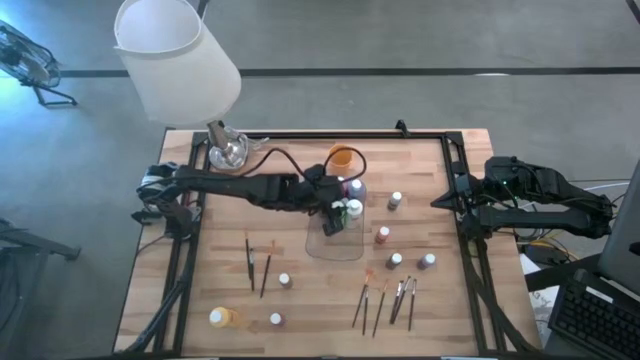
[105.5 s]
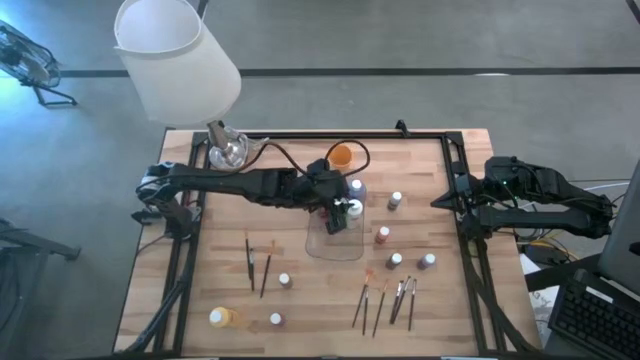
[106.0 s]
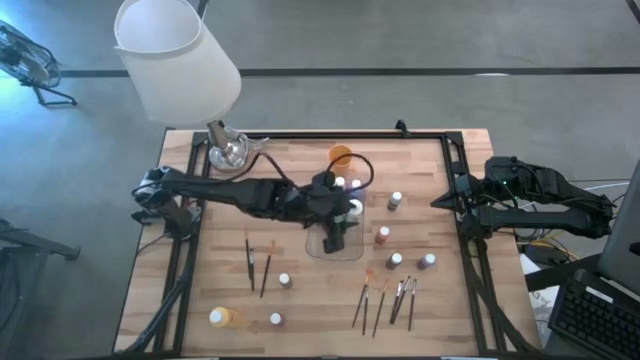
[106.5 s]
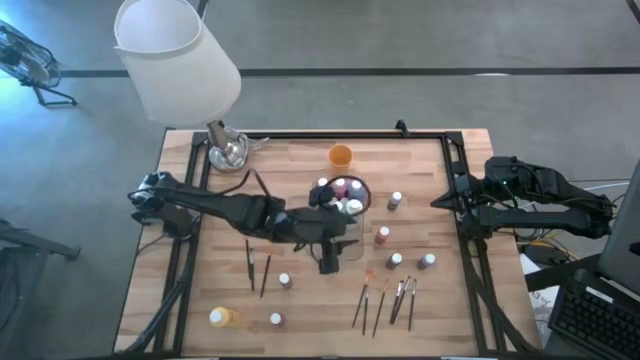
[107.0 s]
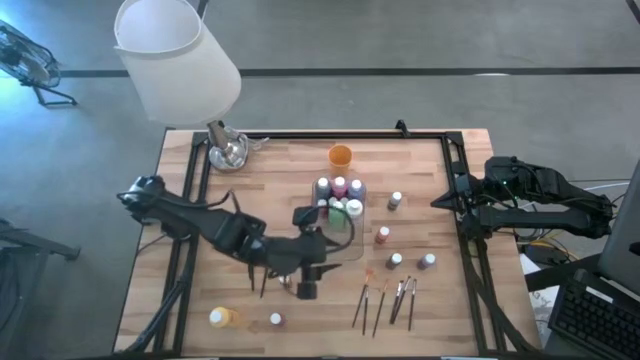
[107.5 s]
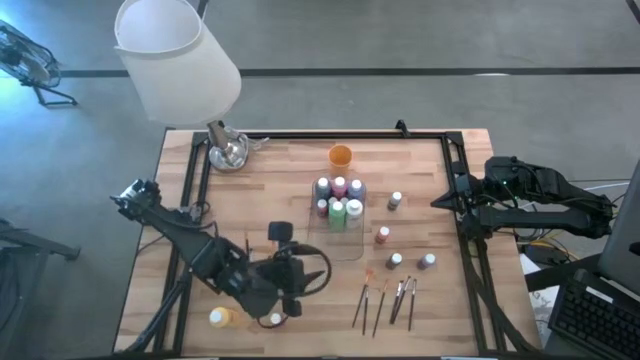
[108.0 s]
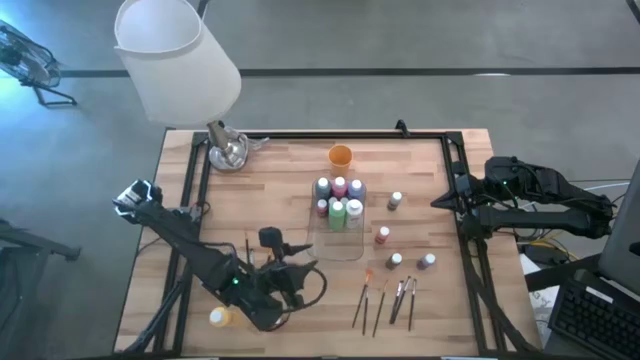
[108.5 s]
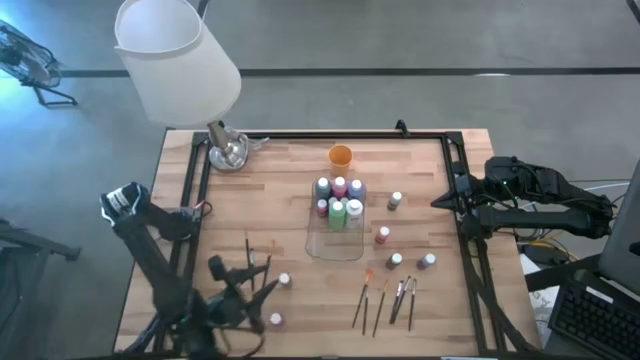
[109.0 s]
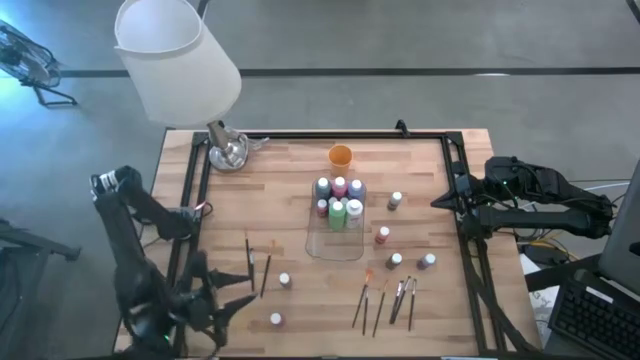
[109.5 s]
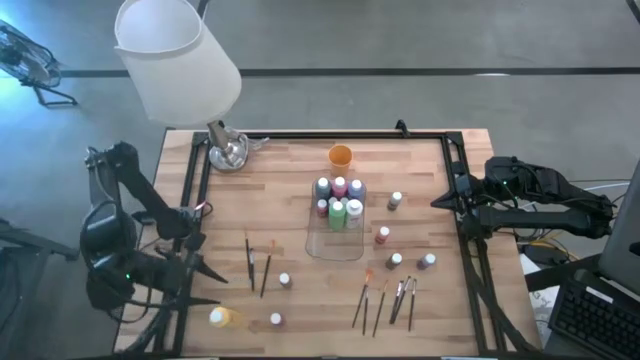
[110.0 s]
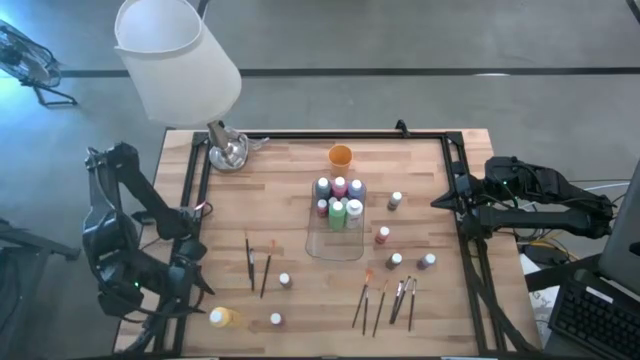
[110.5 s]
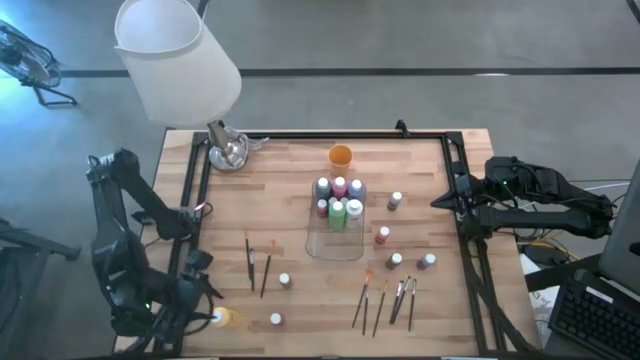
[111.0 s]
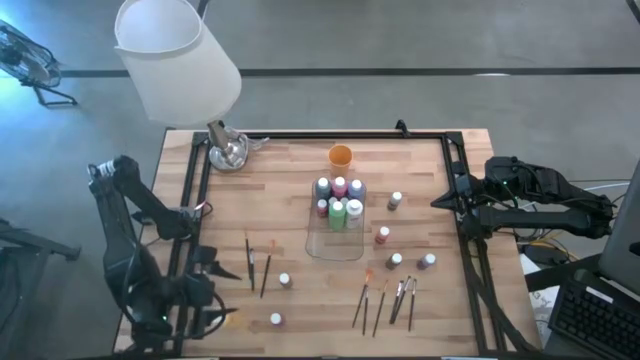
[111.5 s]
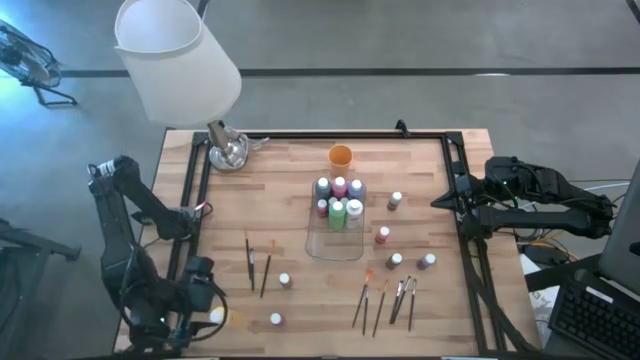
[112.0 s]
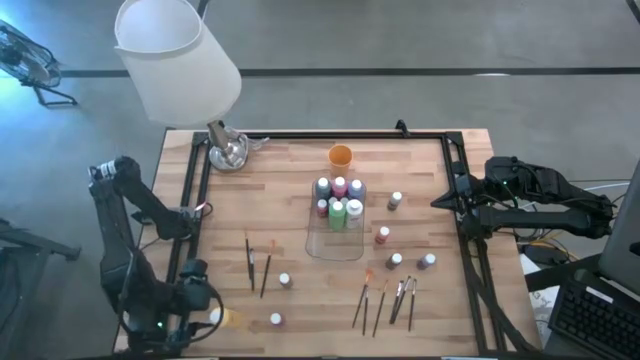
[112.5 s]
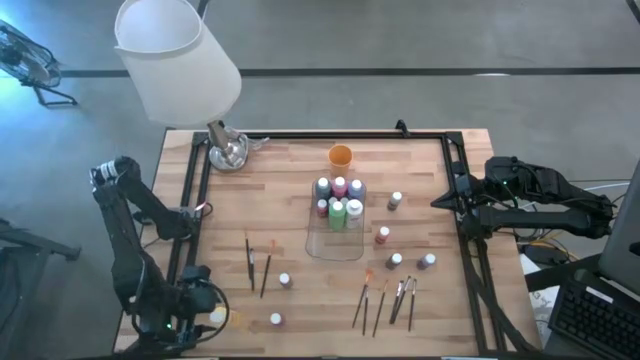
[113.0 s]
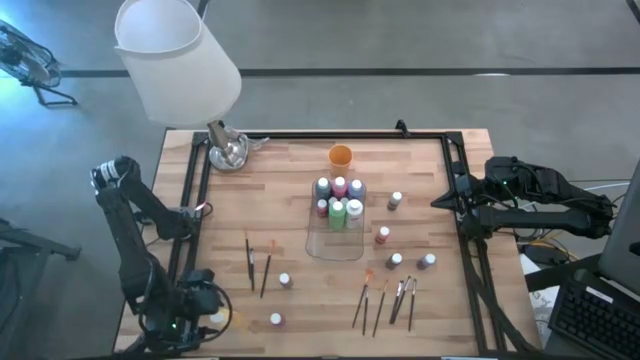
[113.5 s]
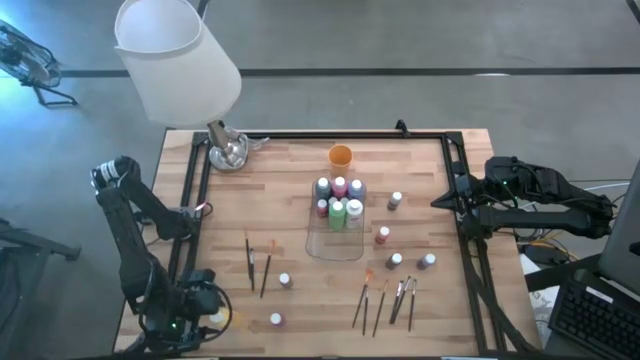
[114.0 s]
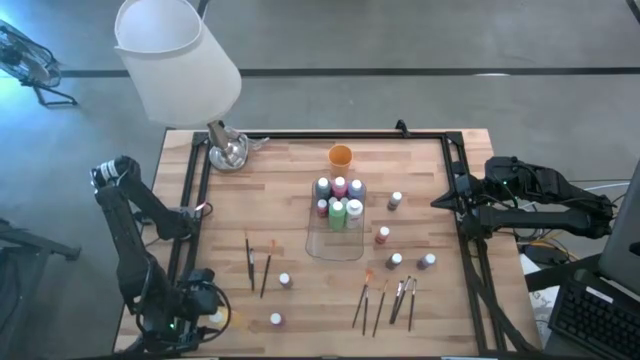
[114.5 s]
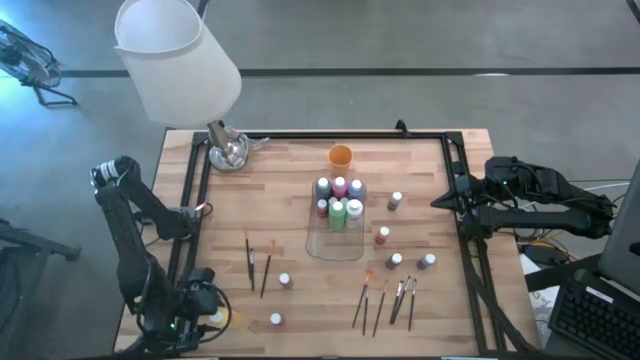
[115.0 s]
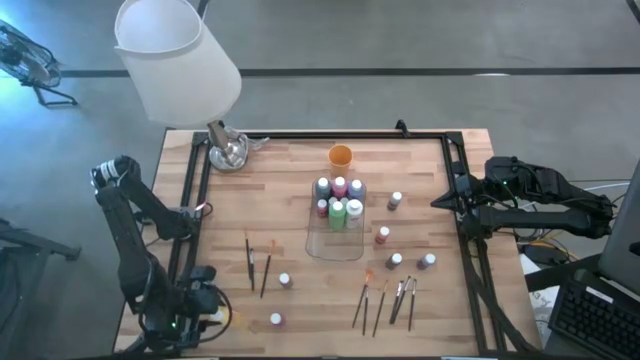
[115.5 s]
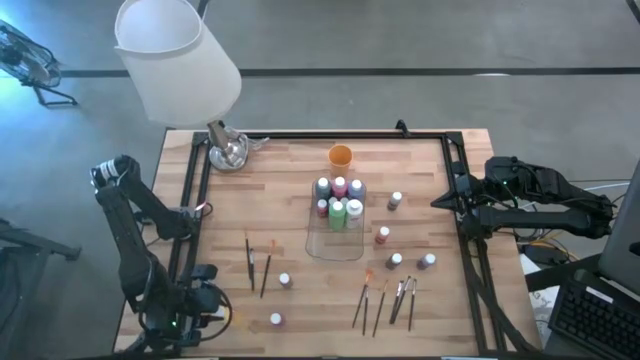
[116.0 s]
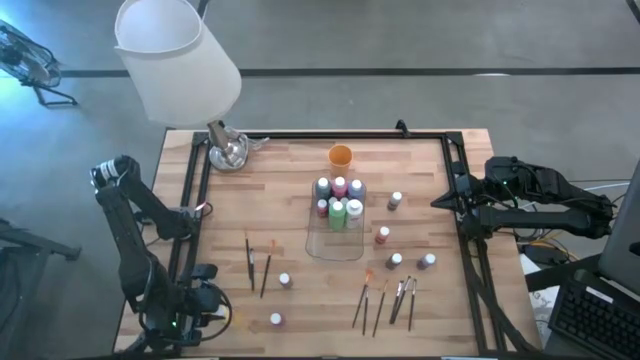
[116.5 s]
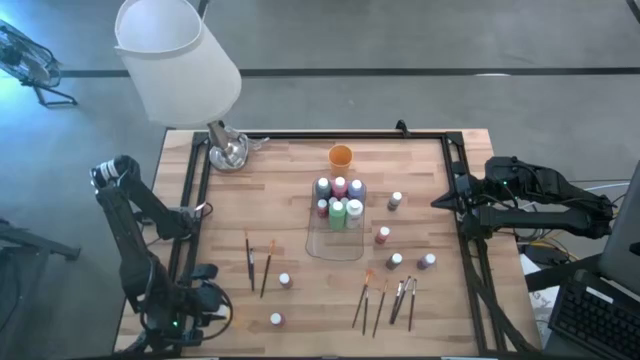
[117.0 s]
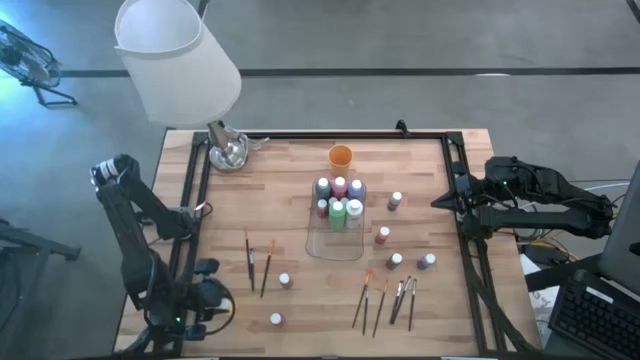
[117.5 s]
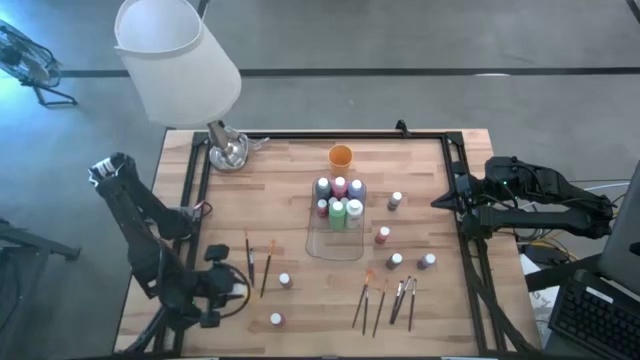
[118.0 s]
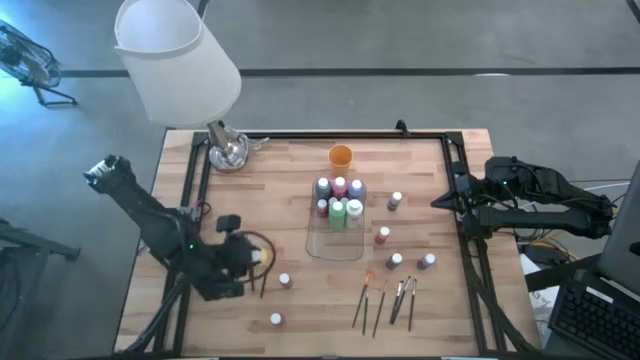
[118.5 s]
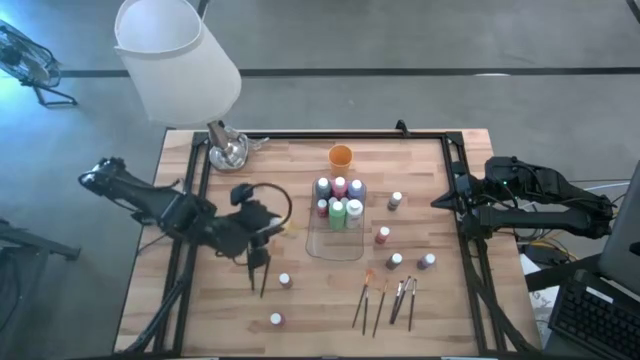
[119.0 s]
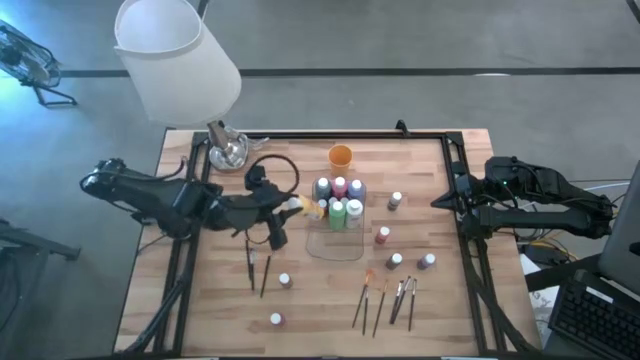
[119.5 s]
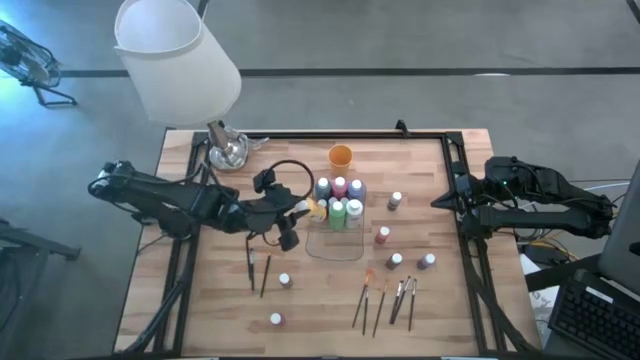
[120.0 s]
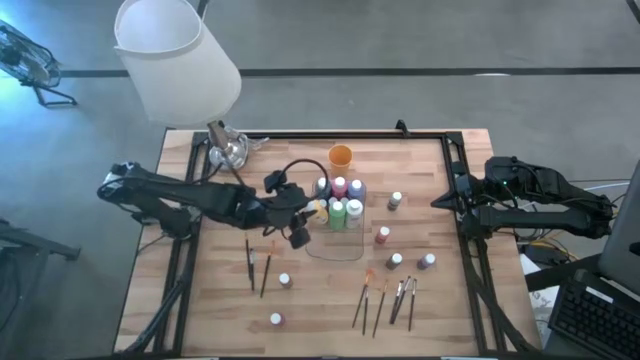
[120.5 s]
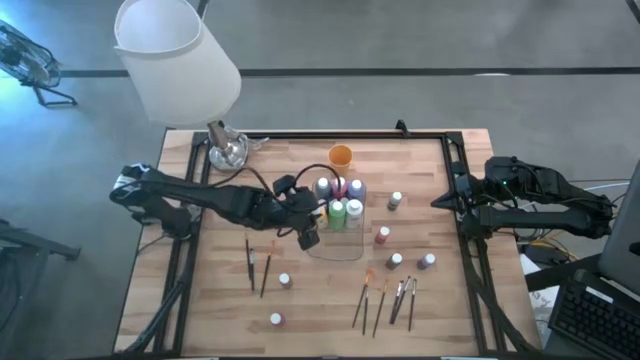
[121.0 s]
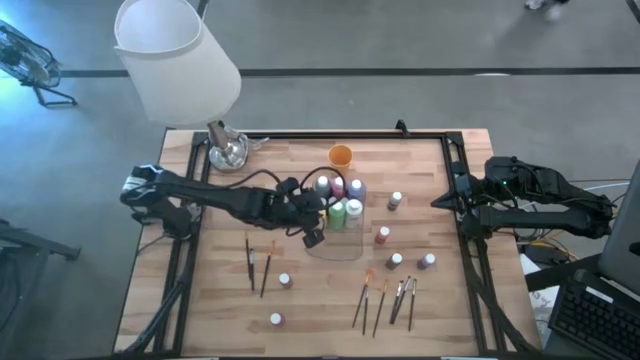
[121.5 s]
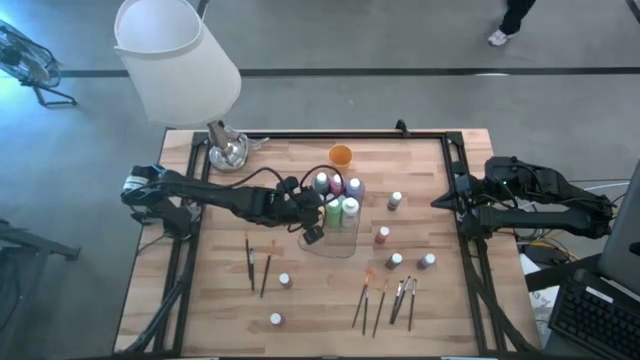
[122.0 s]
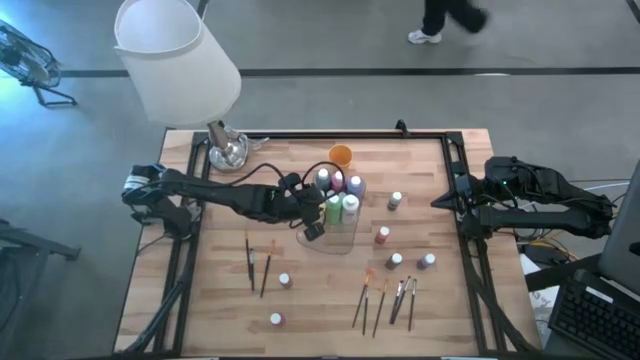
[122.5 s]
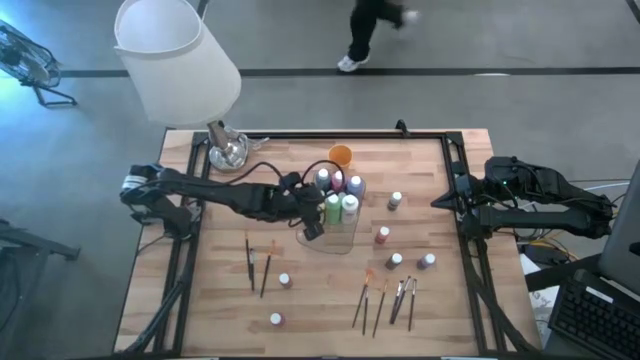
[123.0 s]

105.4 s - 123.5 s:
Task: Pick & Place Paint Supplies
Put the yellow paint bottle into the transparent bin

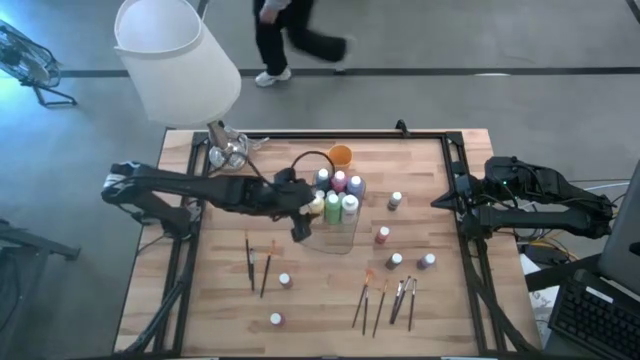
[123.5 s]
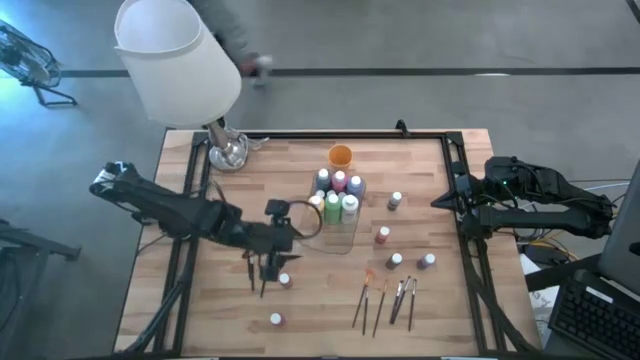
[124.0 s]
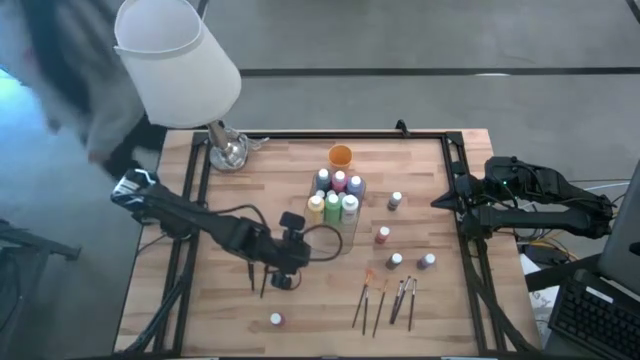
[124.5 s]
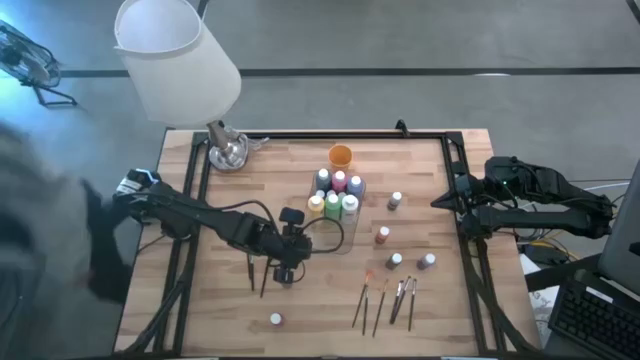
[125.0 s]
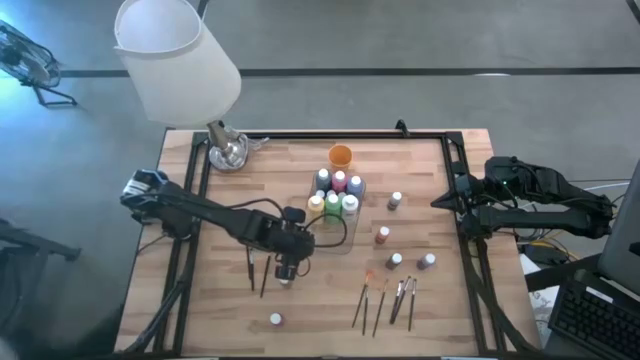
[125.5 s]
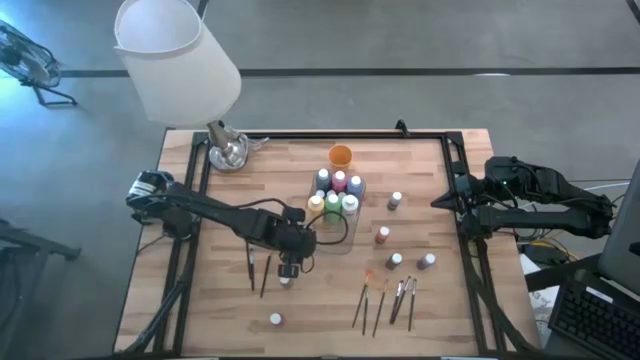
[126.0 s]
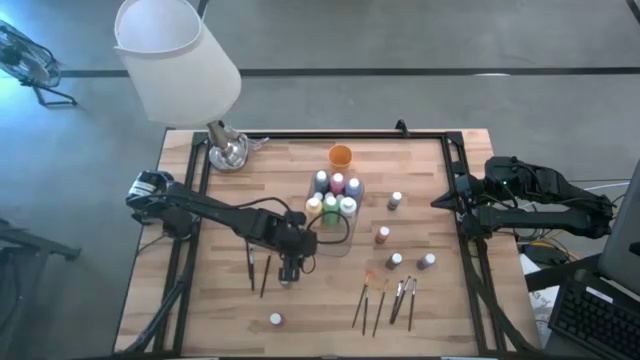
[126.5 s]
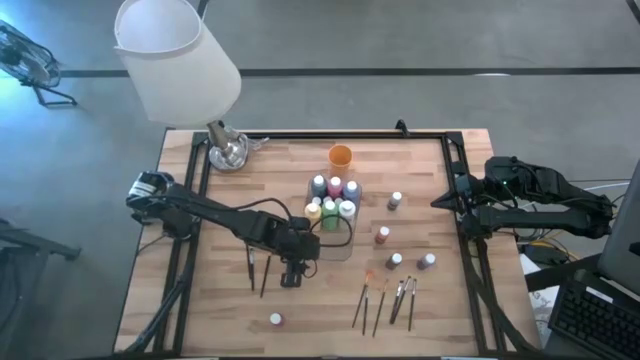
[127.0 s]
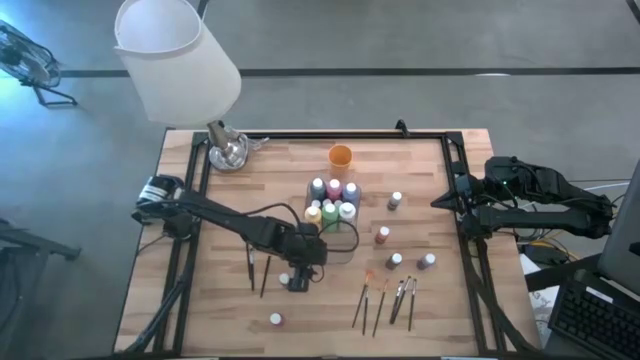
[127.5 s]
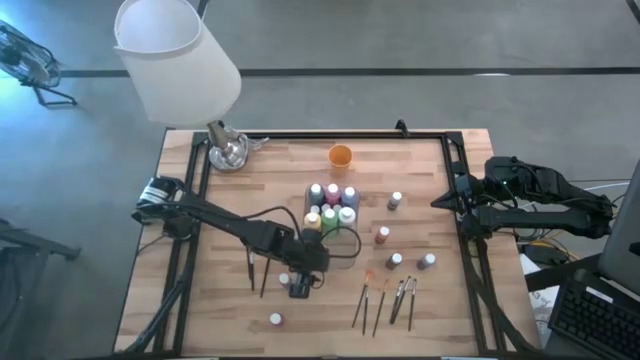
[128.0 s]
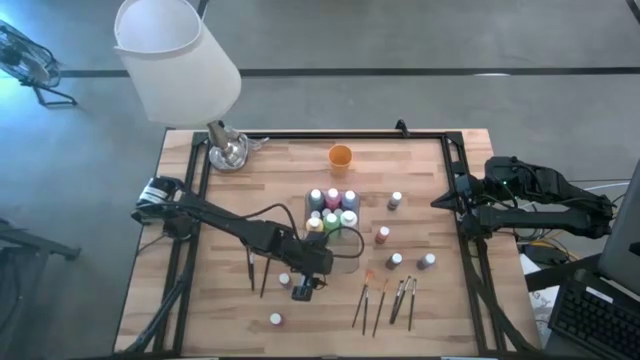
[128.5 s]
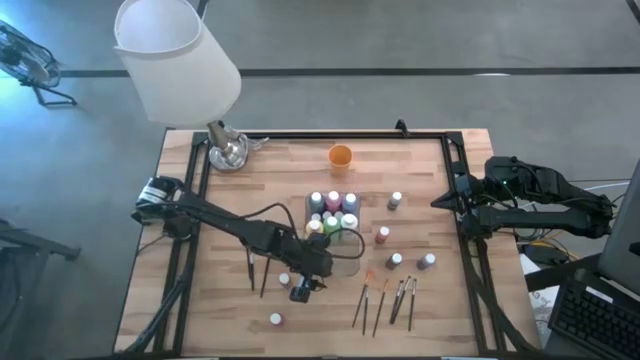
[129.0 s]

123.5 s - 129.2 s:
Adjust the transparent bin
